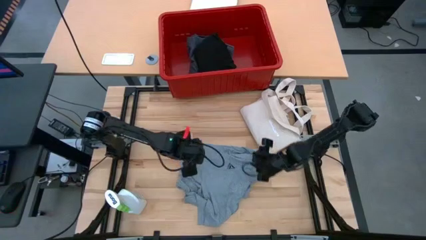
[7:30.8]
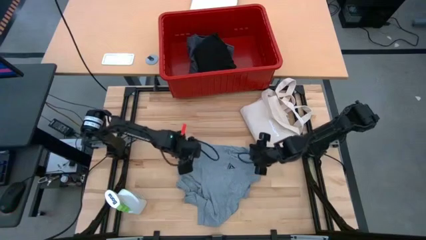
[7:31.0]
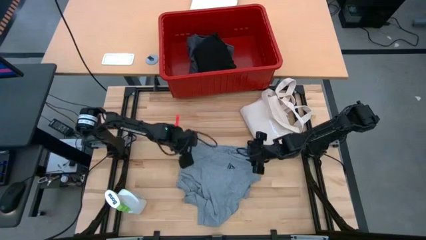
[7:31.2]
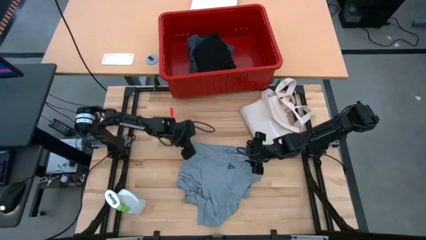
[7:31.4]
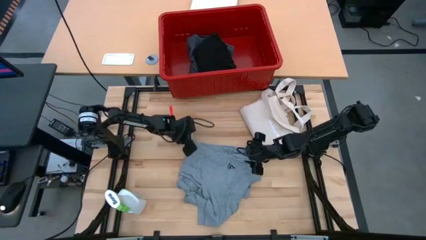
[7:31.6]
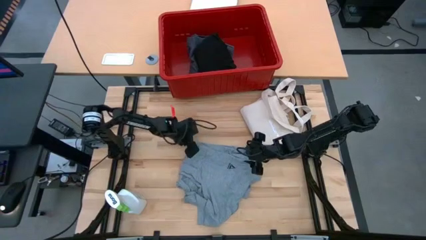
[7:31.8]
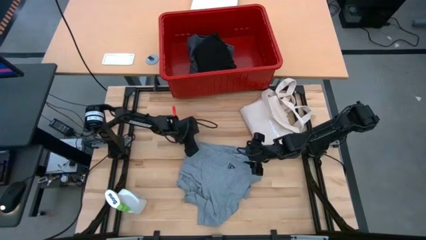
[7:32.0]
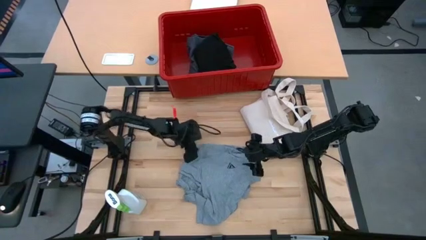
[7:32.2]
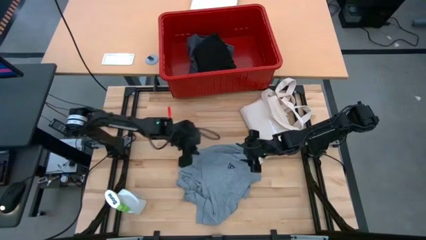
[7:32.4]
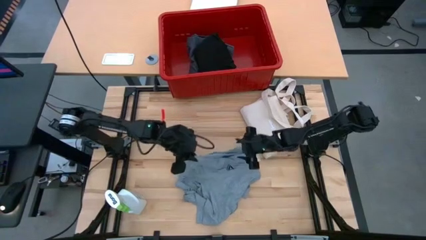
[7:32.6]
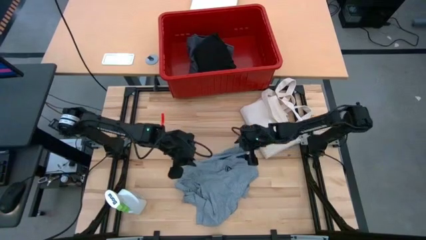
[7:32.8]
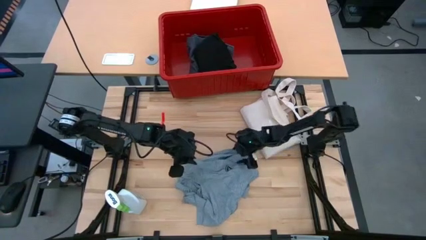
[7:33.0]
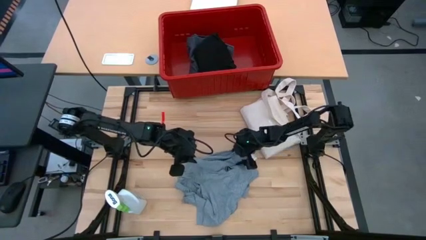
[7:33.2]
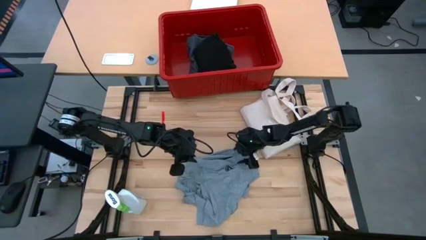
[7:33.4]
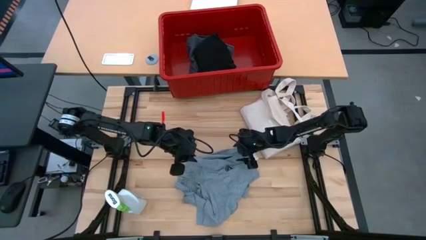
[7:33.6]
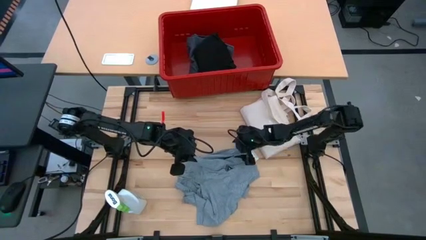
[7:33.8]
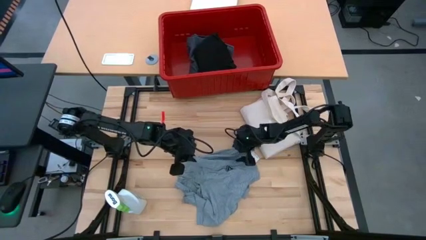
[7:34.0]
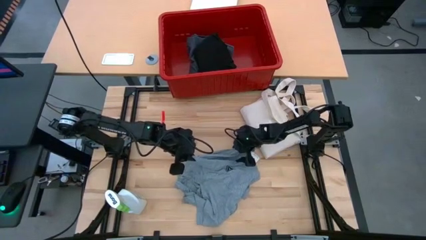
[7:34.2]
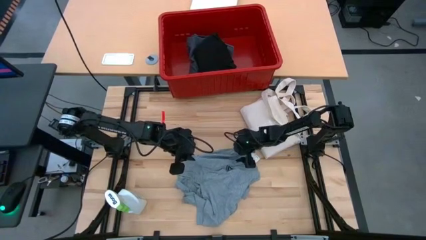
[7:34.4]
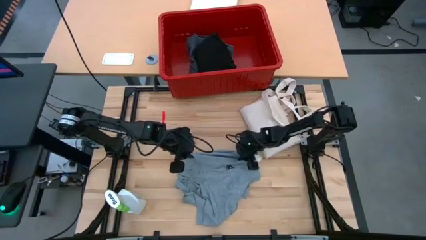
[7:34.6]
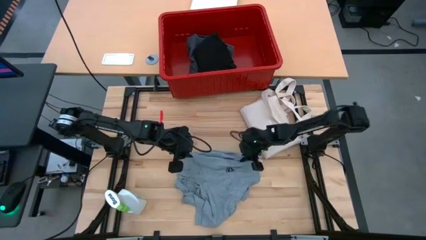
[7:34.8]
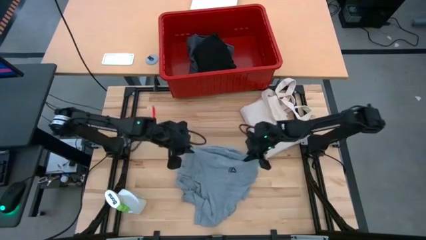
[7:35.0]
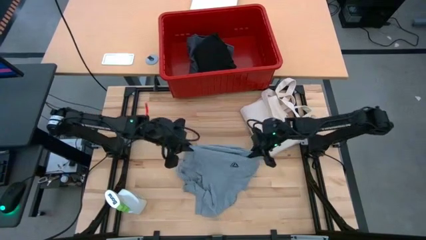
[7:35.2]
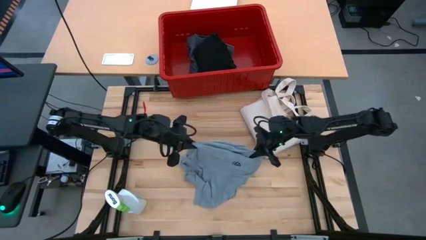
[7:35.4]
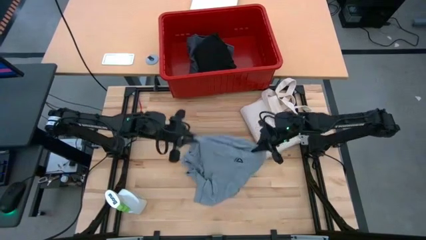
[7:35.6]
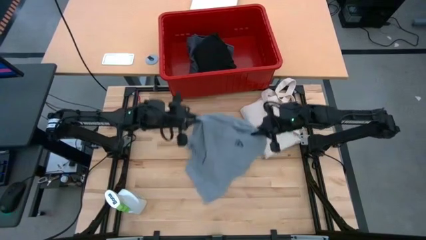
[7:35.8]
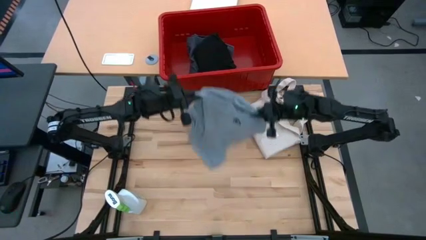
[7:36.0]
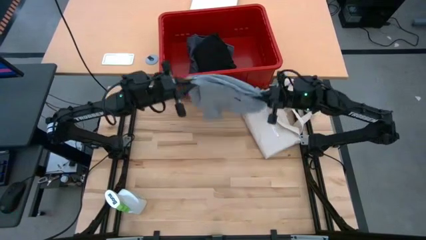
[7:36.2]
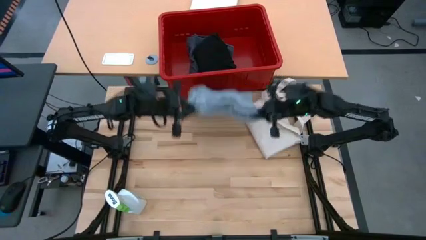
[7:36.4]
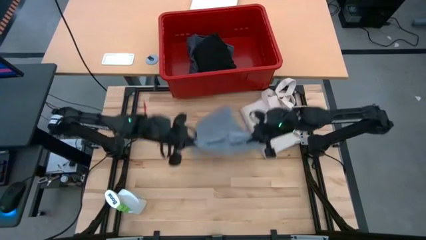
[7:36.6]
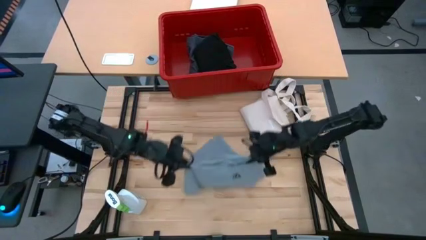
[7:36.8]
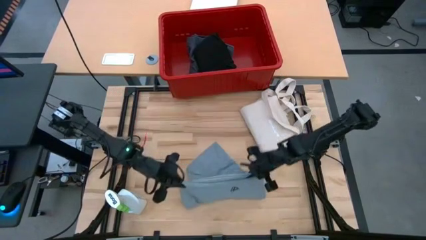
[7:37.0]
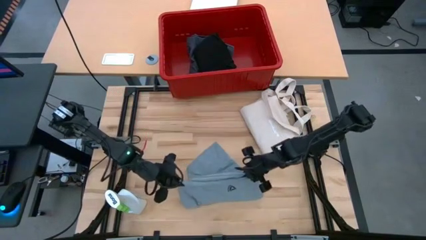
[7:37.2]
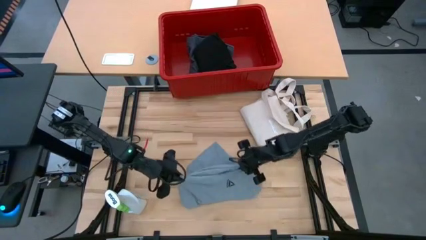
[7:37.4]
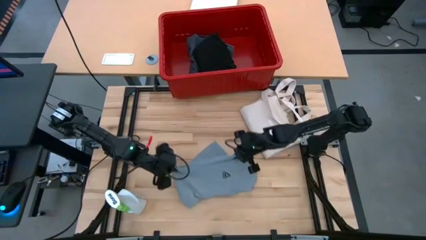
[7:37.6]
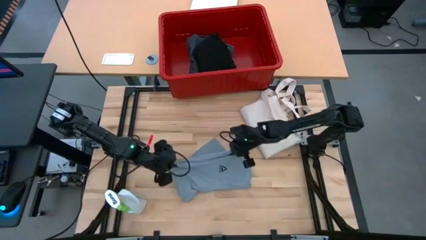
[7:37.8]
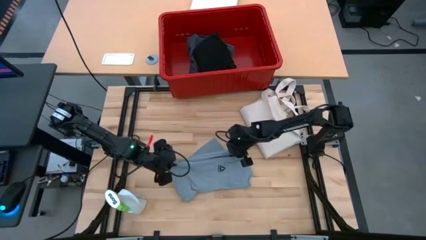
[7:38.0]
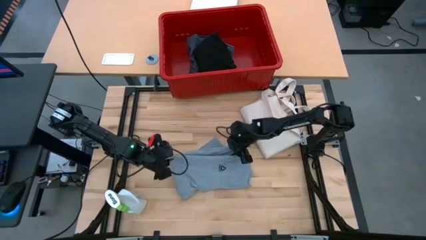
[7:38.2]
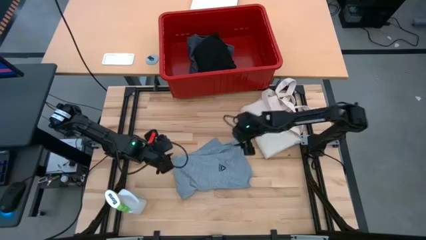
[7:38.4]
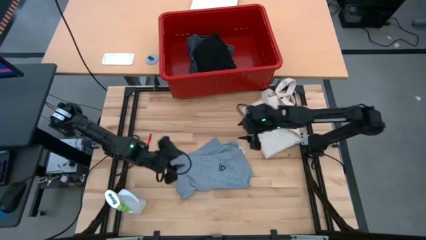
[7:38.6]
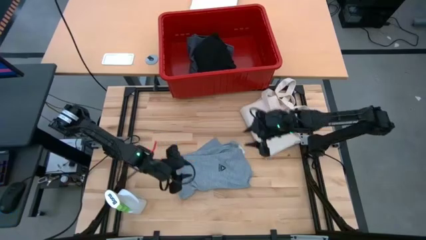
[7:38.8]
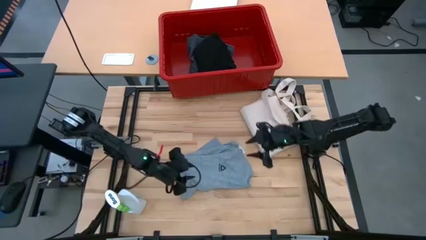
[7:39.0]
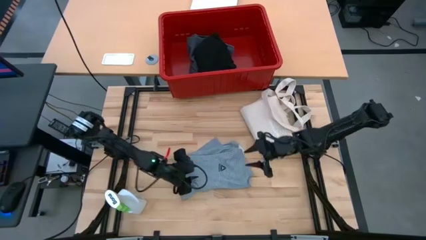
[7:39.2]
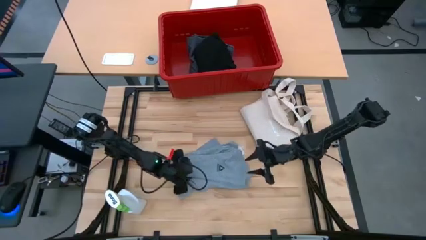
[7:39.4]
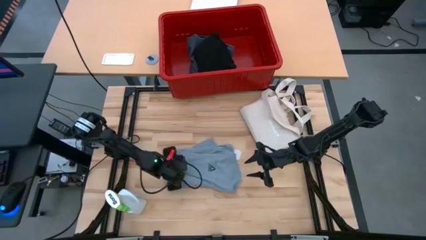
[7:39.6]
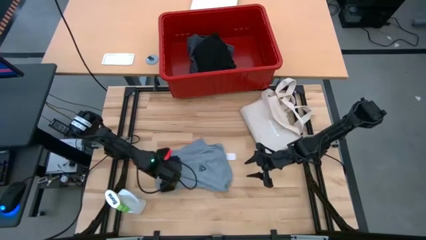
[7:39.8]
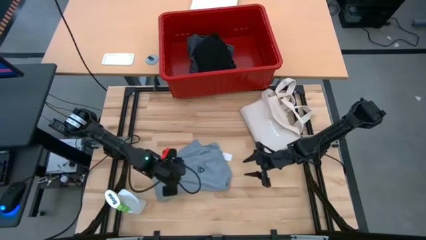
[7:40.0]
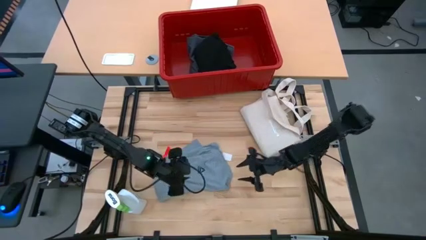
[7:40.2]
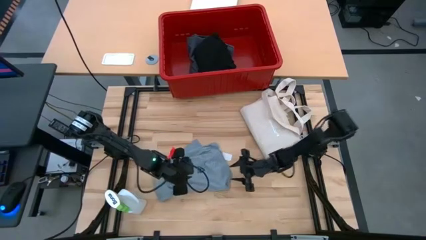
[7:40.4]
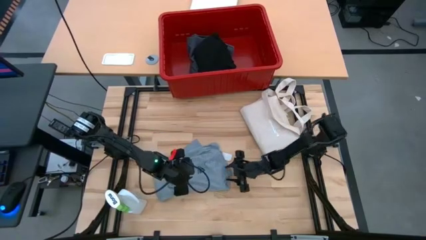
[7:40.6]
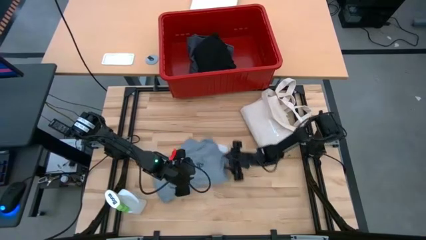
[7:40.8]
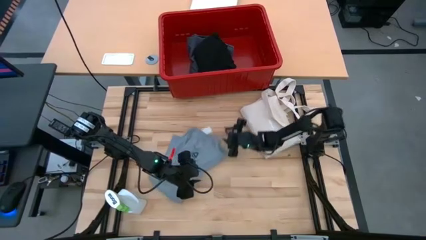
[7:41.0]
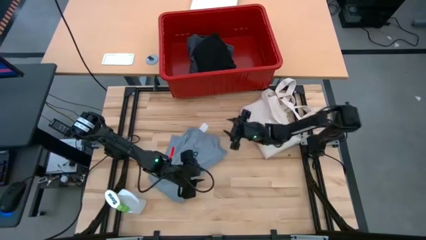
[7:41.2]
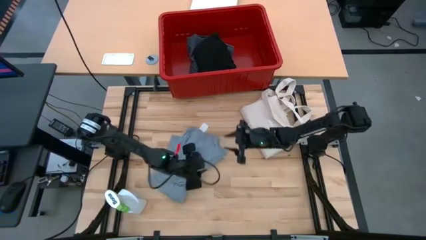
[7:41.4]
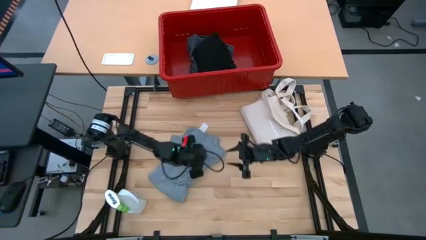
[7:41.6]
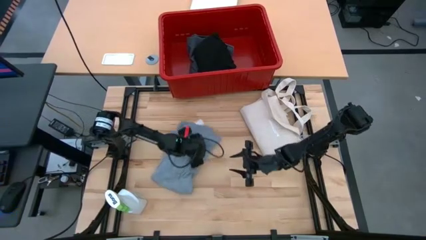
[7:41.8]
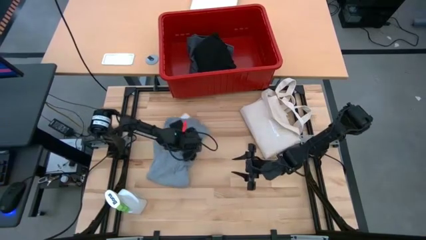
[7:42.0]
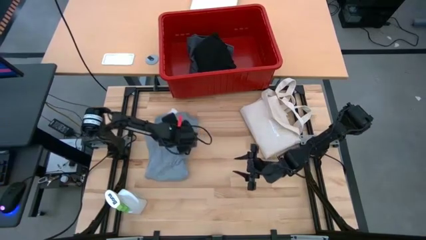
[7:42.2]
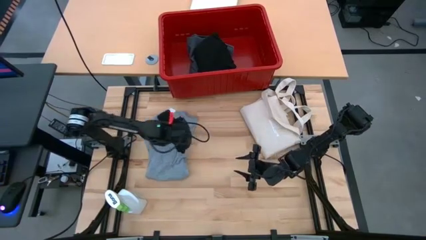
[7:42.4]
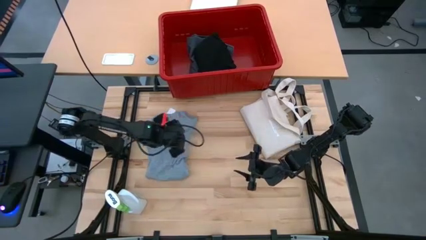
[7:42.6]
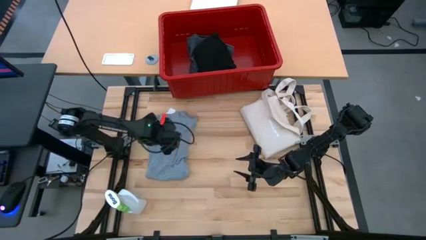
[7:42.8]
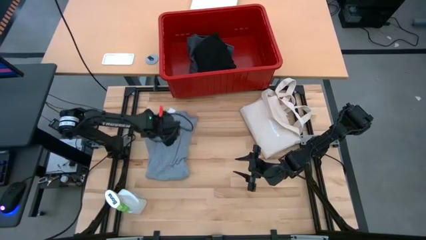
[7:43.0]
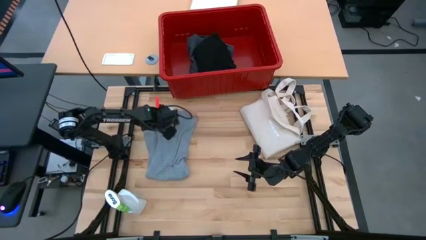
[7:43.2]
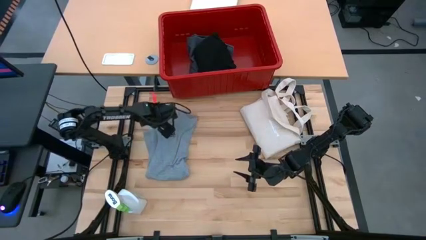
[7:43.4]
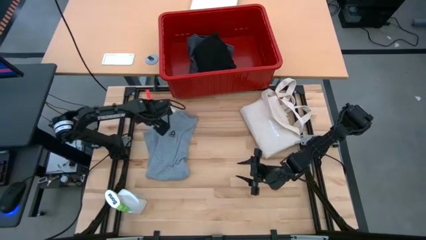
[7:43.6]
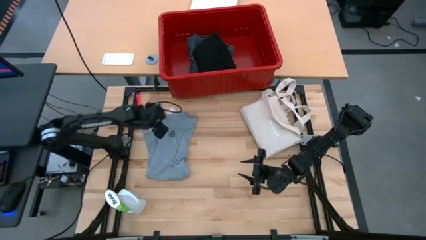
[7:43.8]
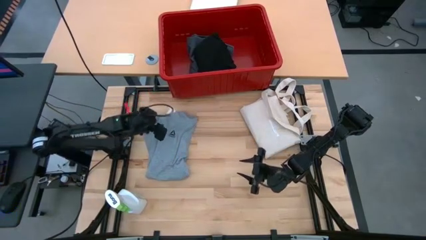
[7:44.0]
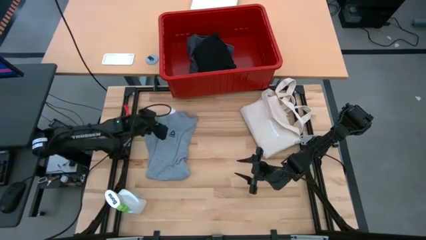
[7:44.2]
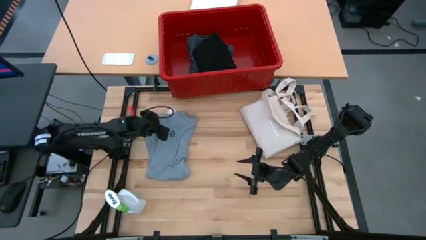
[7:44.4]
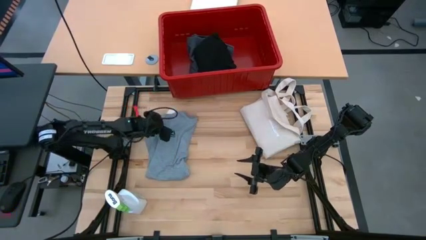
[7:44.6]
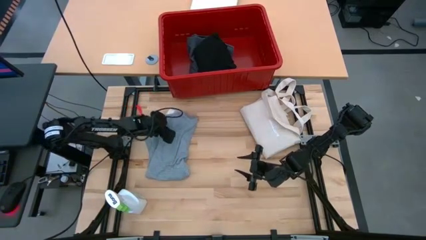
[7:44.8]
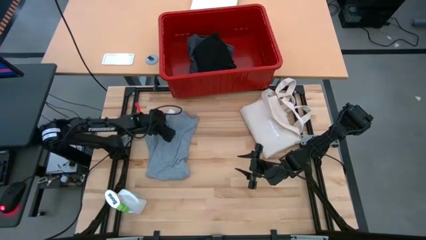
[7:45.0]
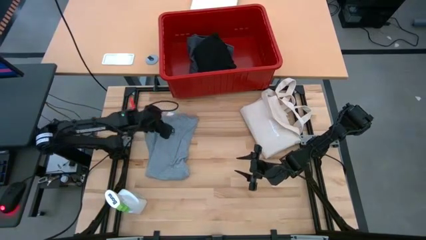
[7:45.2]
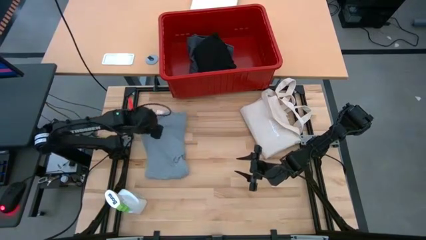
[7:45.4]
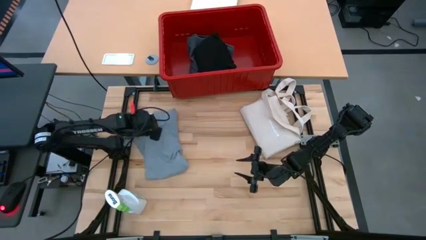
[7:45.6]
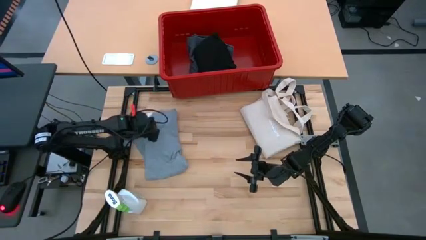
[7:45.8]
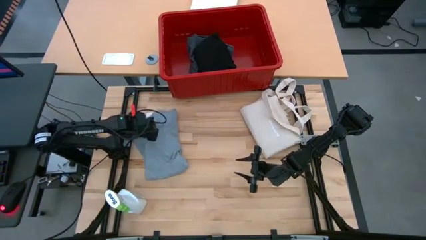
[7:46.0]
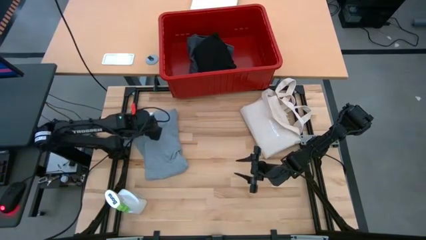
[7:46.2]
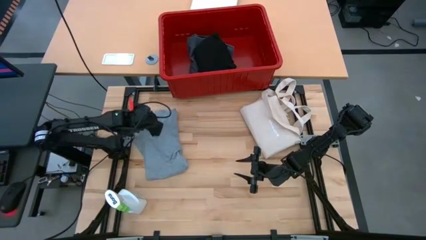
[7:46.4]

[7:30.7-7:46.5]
Task: Fold Laundry from Bin
Fold the gray shirt
